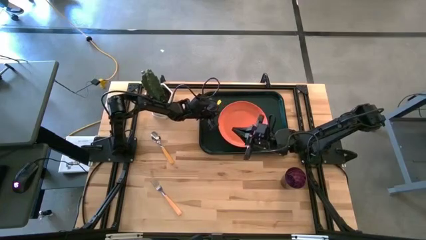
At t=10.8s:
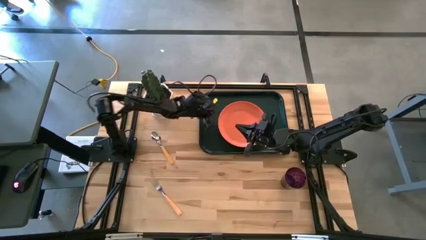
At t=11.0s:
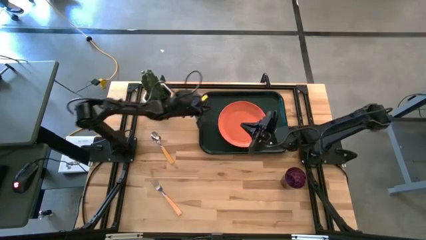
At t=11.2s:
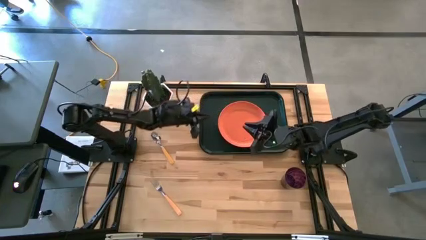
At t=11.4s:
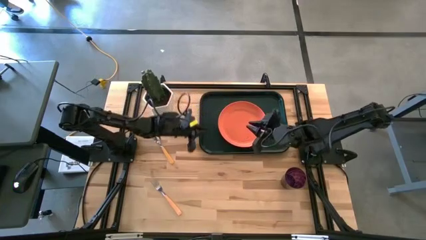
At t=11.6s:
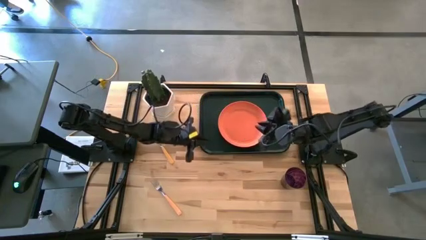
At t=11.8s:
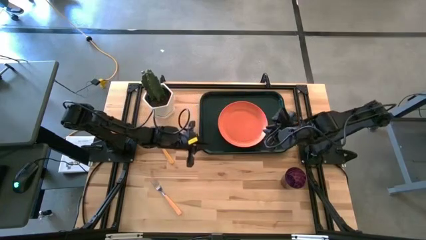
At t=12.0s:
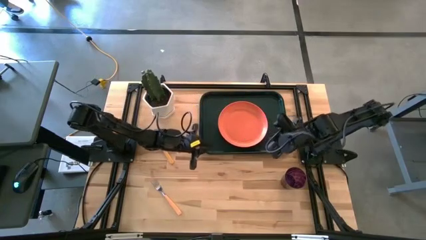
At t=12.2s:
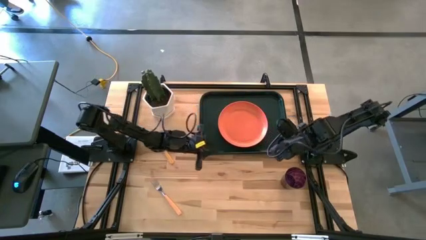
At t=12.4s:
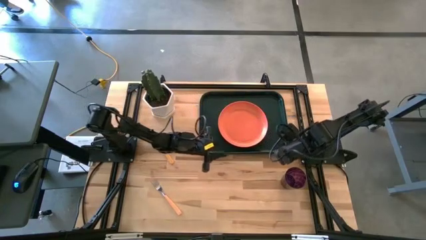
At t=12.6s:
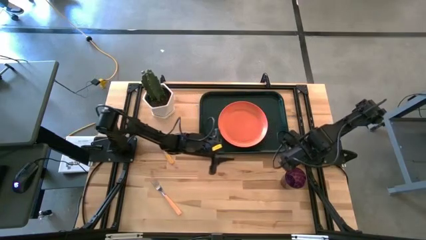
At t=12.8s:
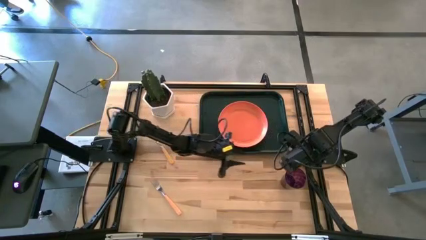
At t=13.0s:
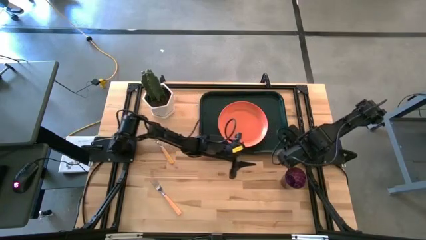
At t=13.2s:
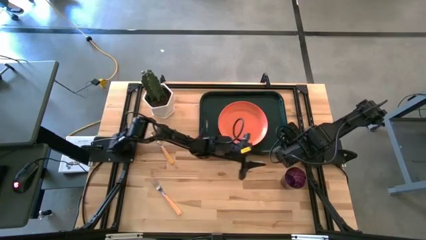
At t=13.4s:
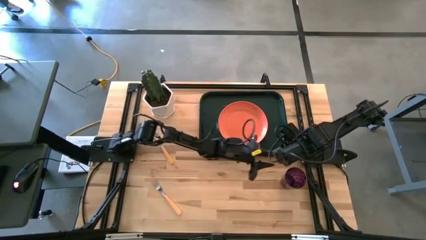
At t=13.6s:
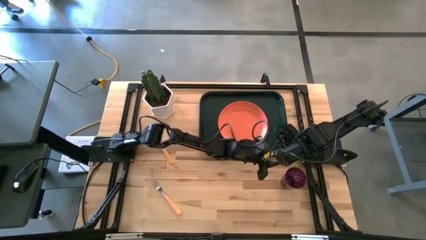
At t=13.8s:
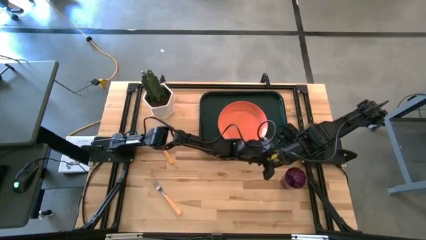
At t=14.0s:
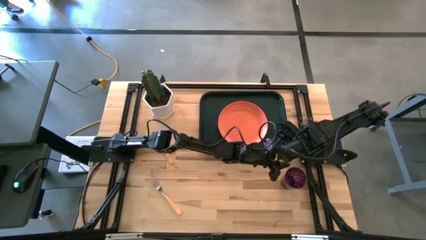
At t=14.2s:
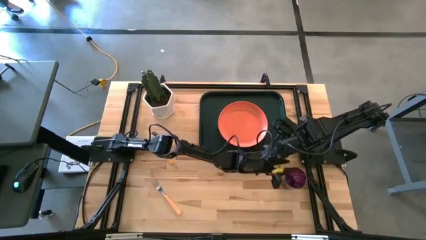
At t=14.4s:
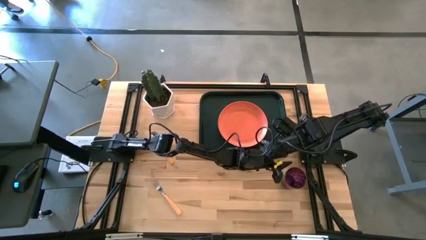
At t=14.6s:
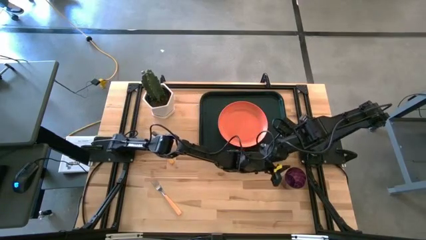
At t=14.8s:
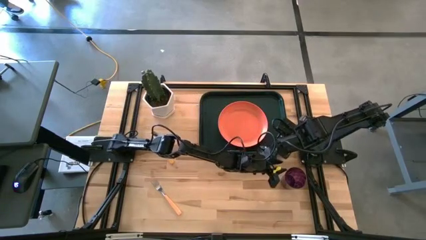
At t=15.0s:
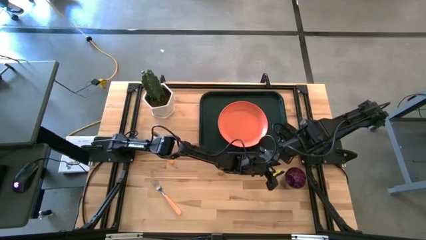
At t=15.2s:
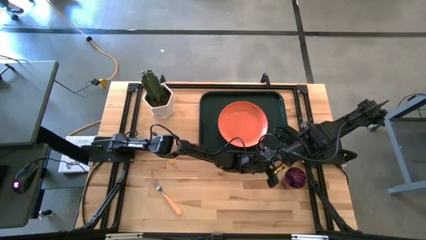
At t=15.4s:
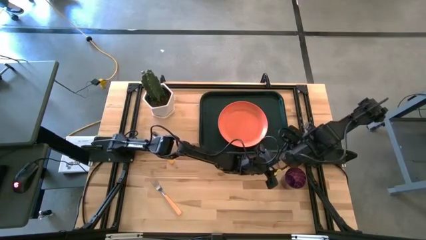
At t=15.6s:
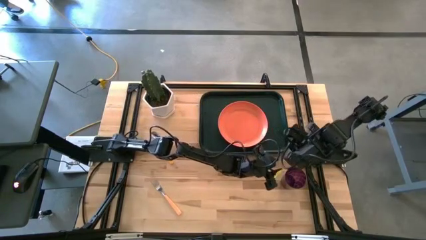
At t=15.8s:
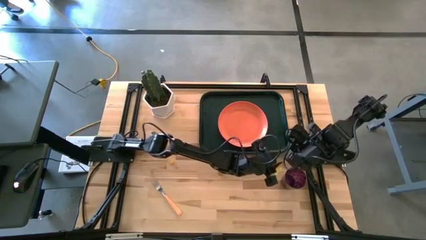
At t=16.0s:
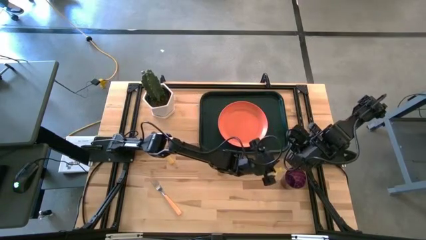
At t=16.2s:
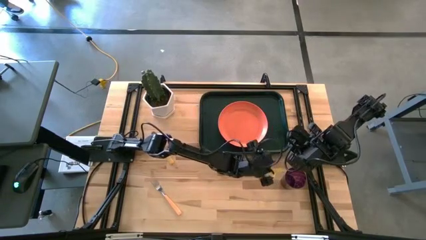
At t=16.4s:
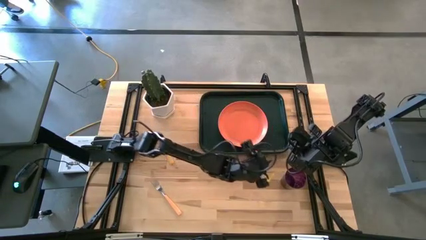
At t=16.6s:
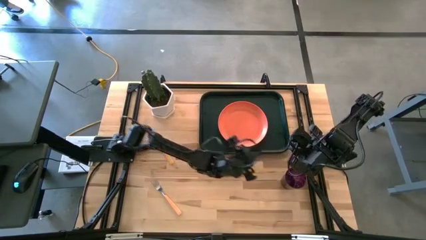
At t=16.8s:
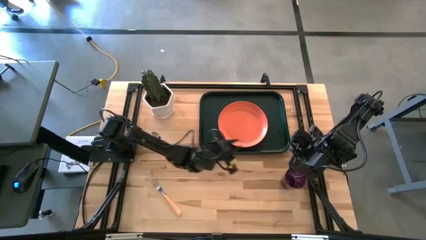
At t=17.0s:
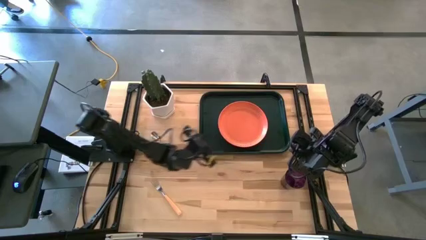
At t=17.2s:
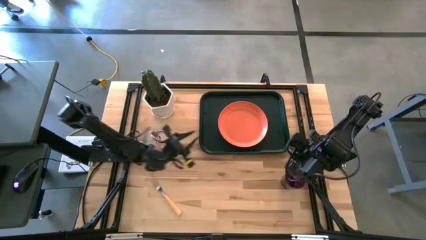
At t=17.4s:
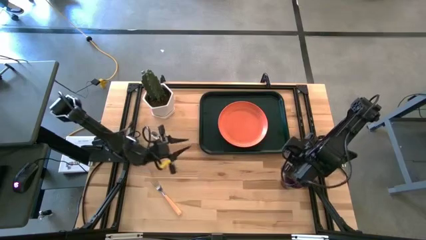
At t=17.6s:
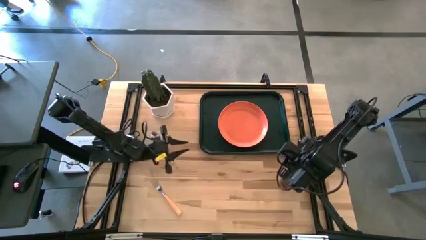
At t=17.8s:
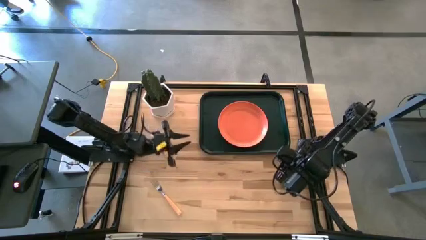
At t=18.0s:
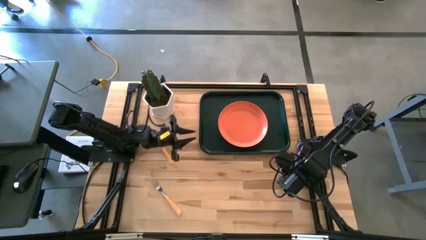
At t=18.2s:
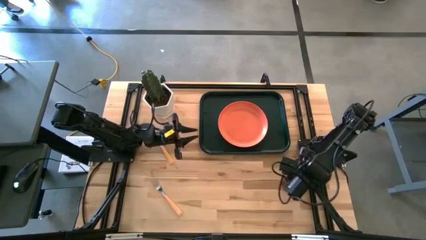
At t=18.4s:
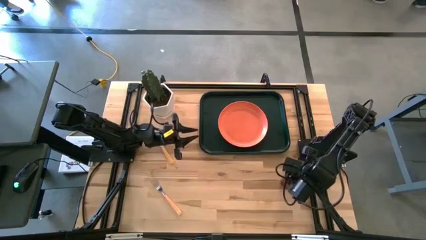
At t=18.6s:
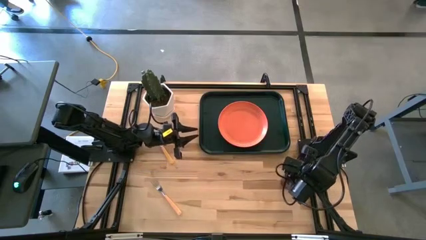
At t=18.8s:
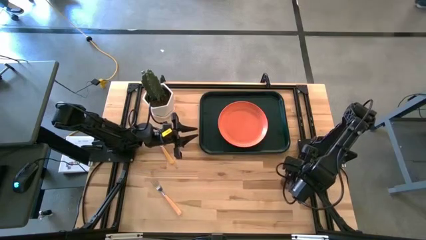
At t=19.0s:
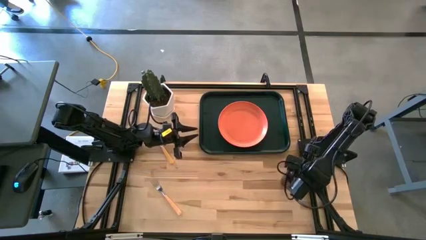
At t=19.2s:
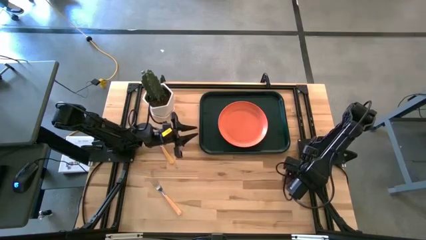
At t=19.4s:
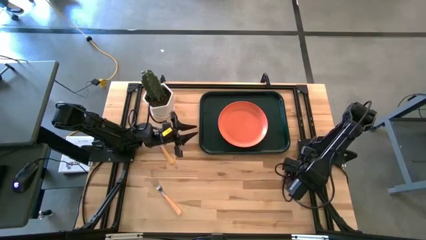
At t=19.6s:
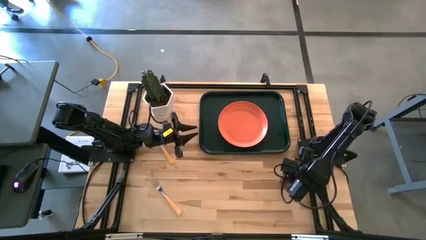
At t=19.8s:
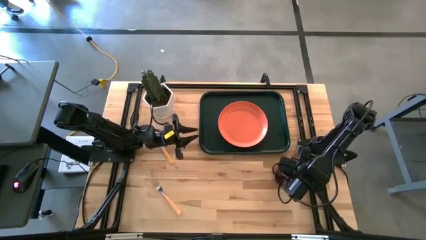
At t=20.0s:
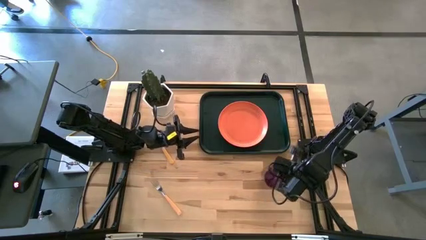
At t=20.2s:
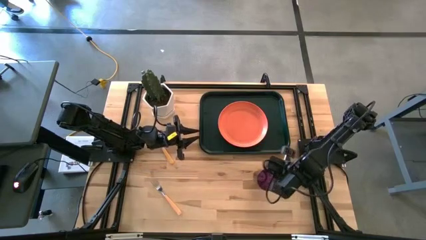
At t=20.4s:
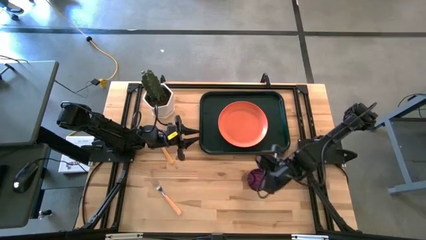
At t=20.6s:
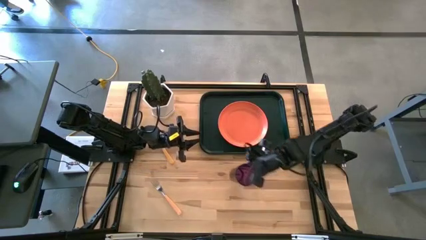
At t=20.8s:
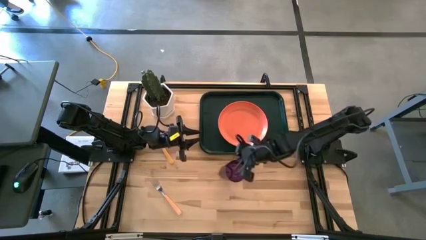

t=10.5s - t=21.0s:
Task: Pick and place plate/cup/fork/spoon on tray
Put the purple cup on the black tray to the top left of the orange plate

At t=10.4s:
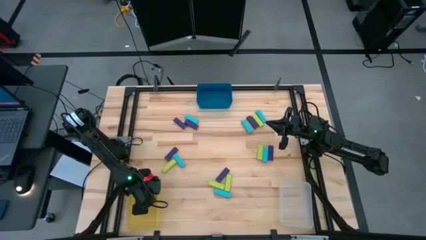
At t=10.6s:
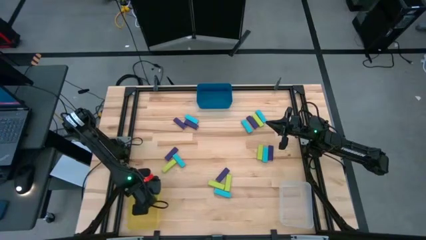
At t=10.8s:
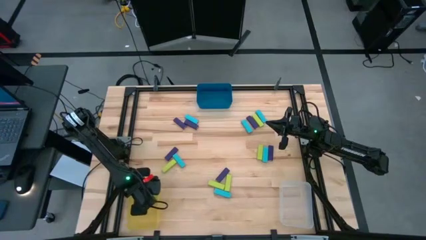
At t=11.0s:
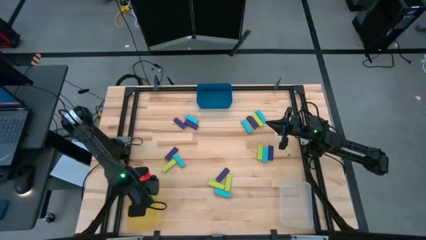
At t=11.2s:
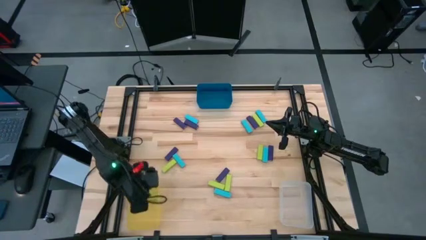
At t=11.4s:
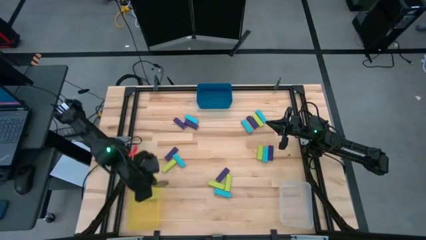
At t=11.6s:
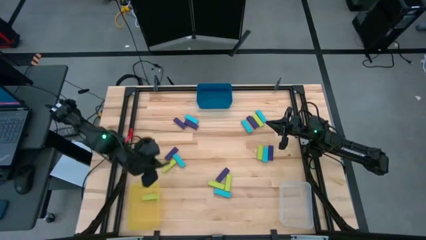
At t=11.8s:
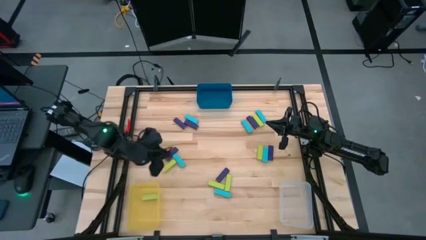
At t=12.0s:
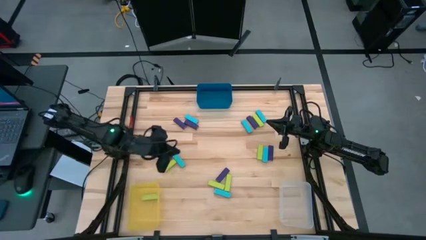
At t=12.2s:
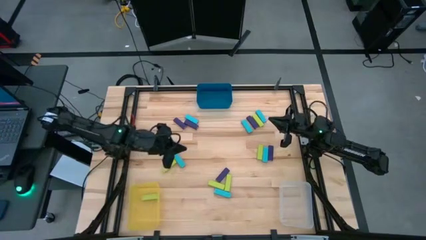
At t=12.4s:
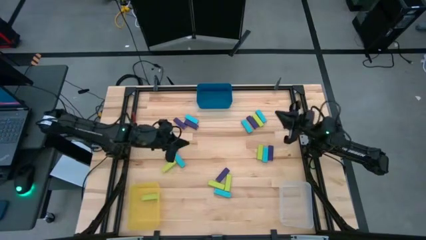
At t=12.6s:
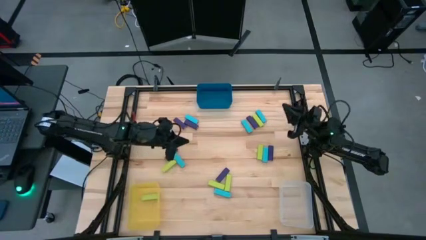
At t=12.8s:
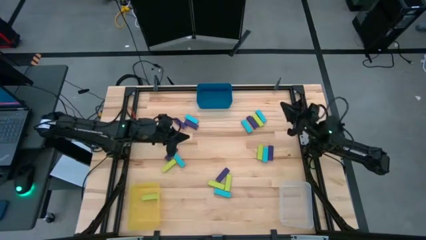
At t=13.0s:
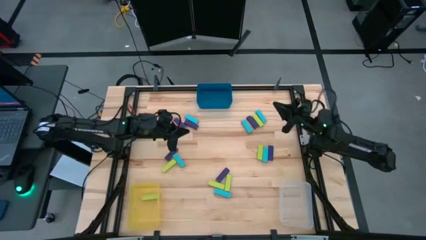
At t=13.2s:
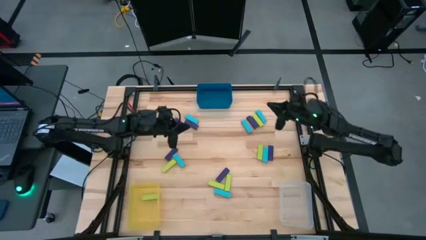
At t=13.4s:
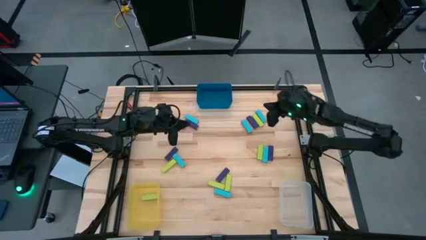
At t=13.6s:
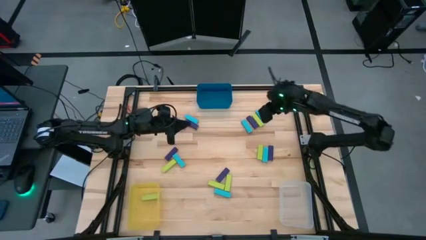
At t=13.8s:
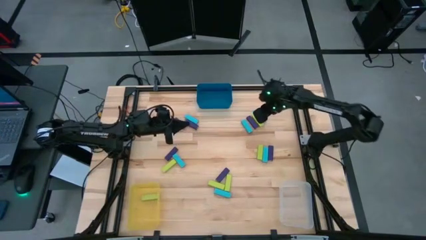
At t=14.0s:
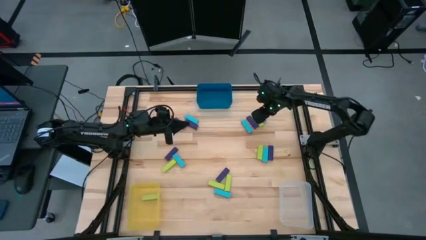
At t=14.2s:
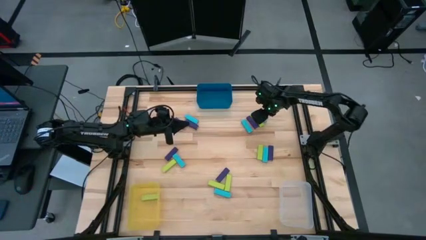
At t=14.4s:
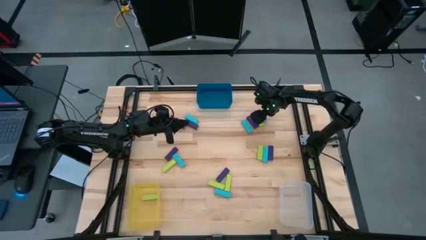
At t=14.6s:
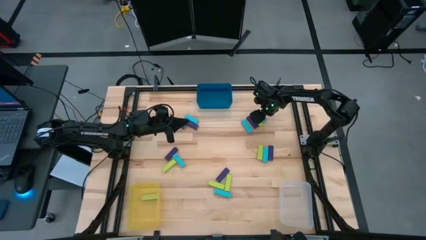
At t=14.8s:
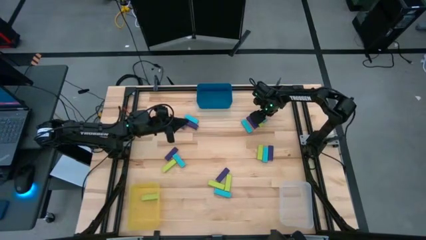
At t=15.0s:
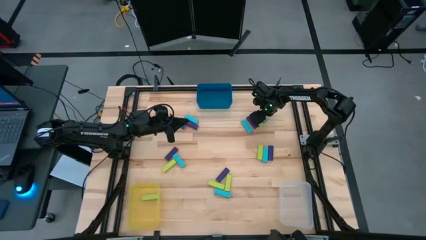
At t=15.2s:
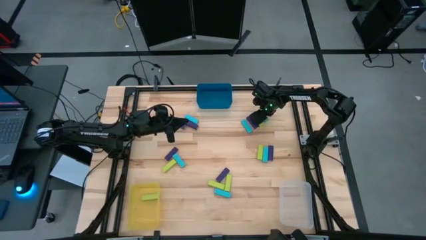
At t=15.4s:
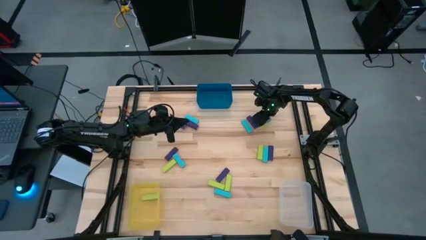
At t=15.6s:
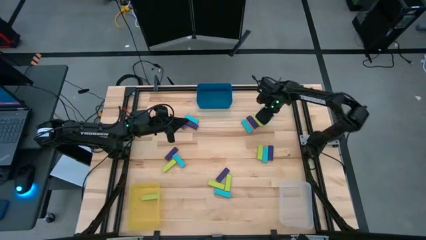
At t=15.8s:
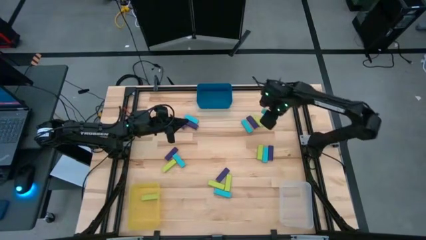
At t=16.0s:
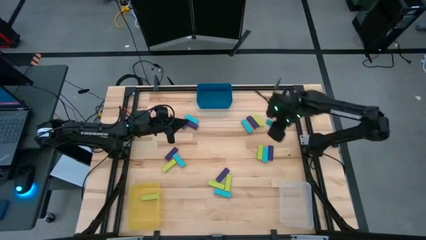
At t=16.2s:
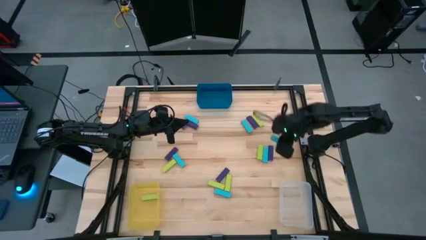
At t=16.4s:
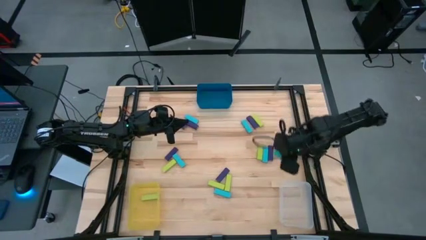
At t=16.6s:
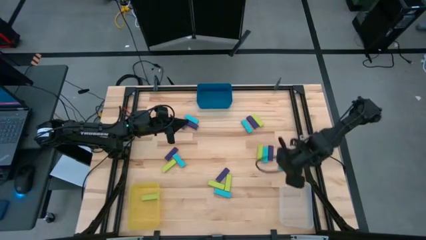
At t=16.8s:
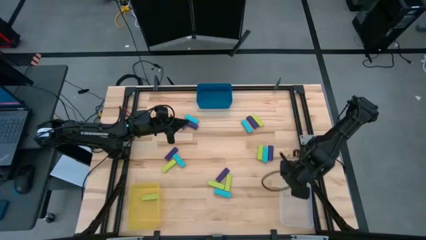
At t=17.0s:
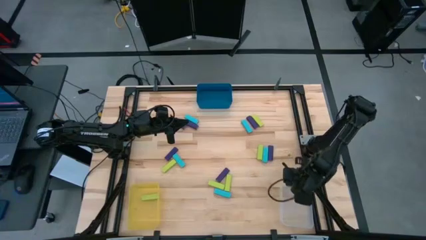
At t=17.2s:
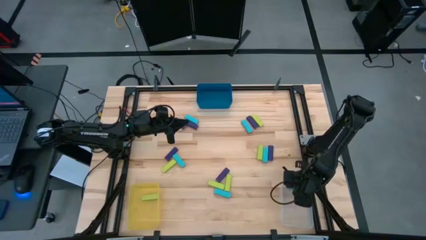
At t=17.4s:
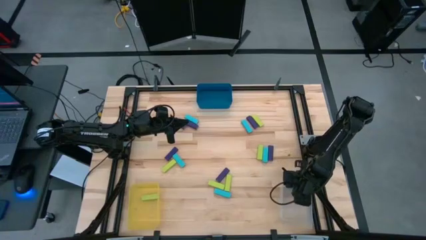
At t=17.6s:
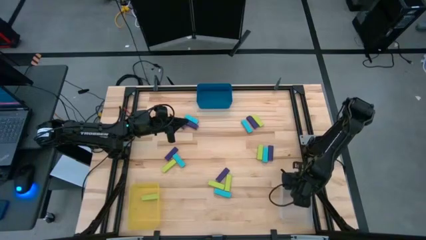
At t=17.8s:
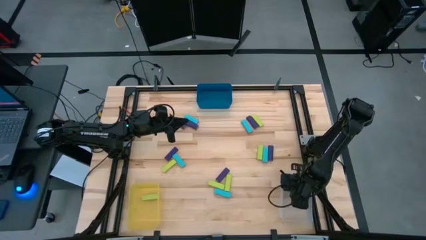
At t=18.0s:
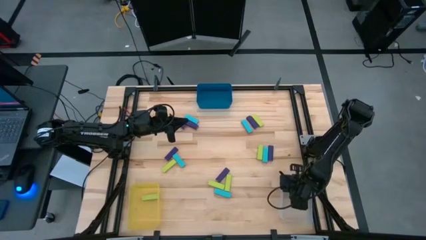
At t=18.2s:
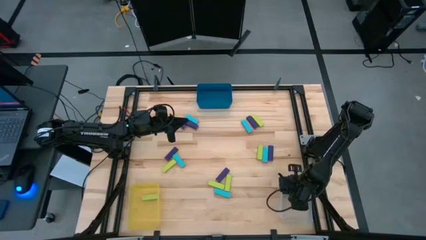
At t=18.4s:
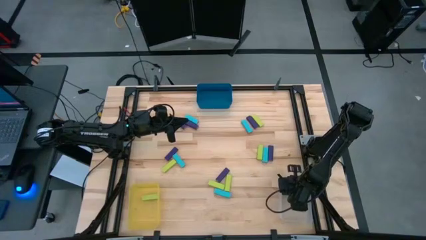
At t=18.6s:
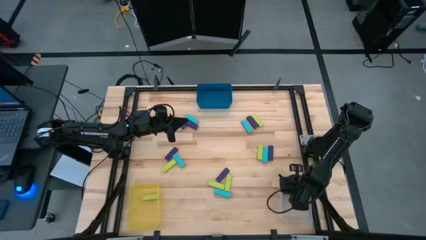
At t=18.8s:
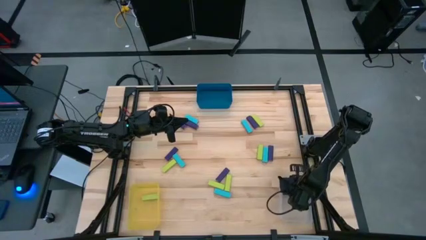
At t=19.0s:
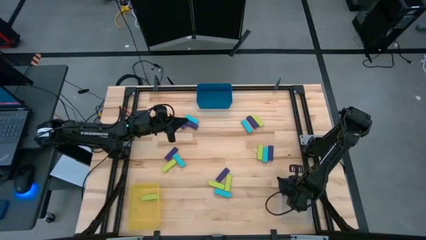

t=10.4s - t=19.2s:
Task: Sort blocks
Put the sky blue block into the white bin
